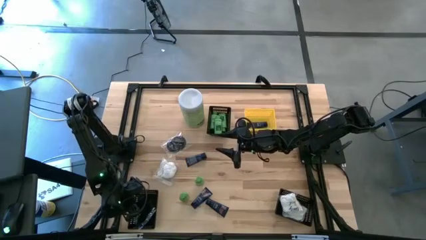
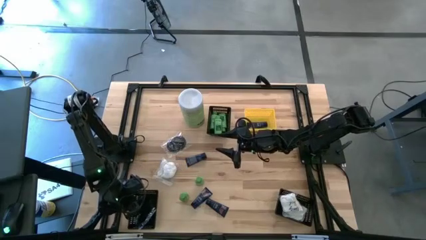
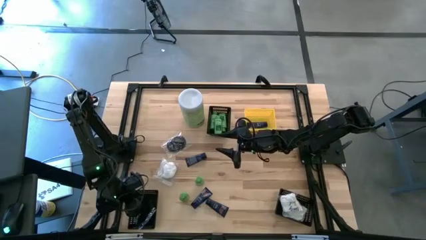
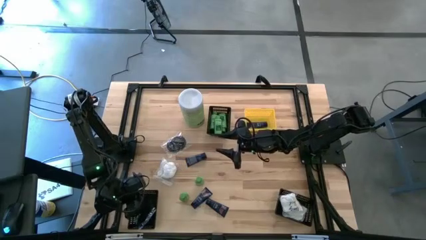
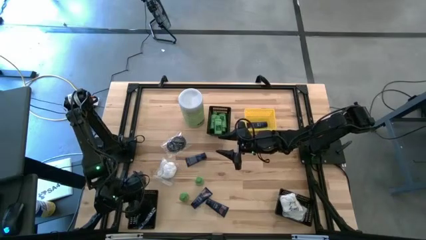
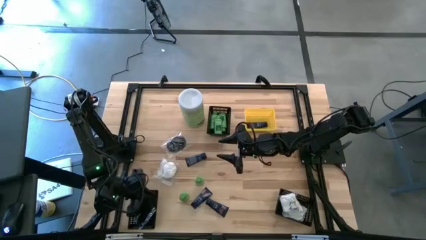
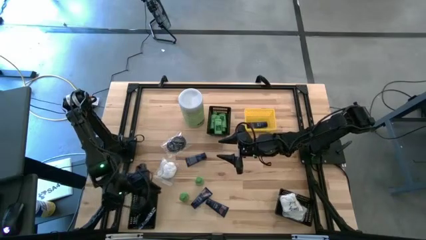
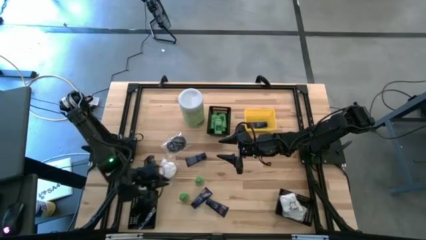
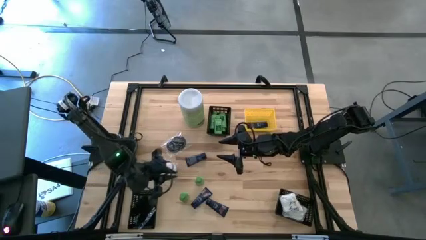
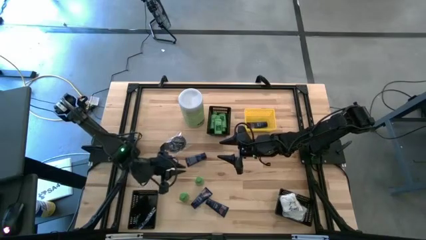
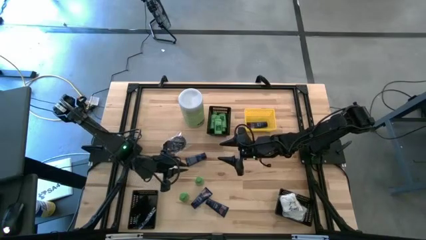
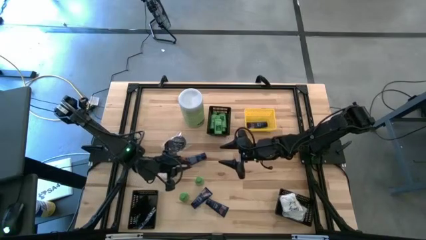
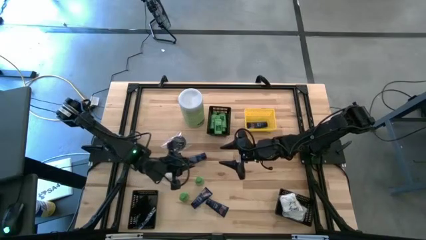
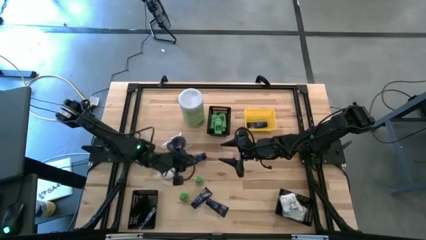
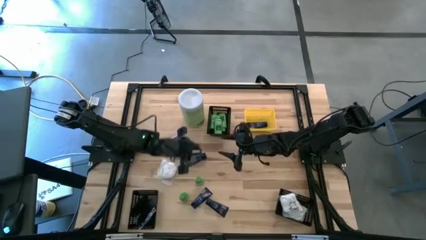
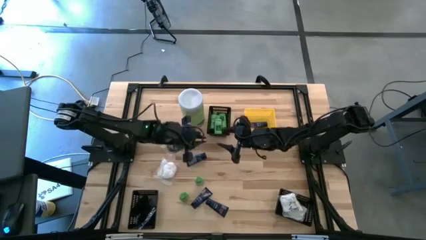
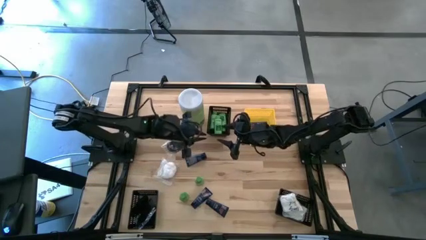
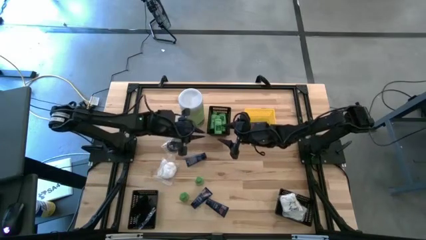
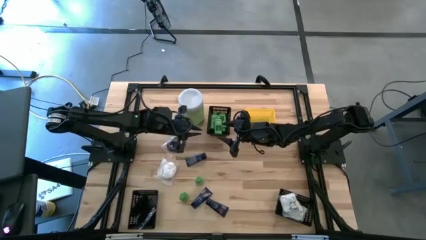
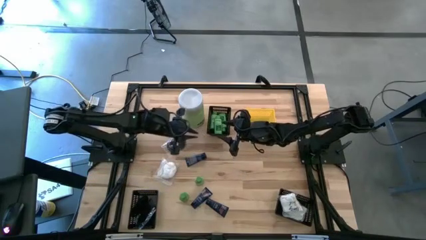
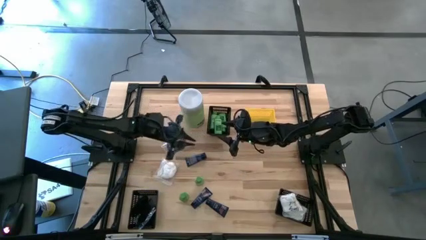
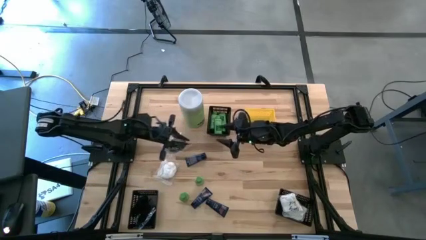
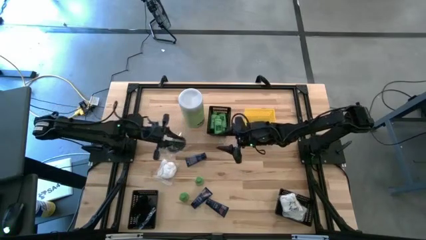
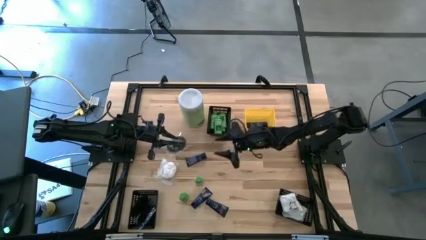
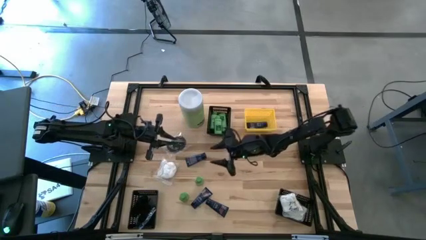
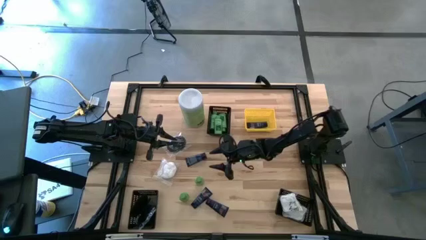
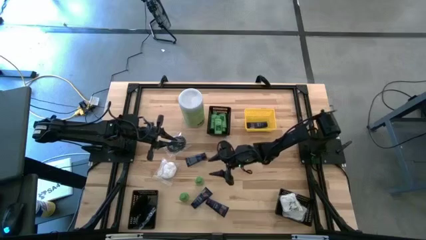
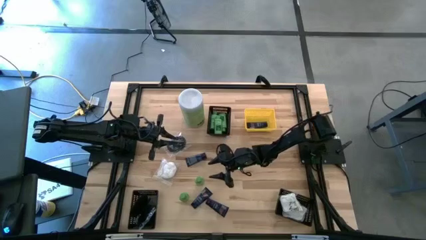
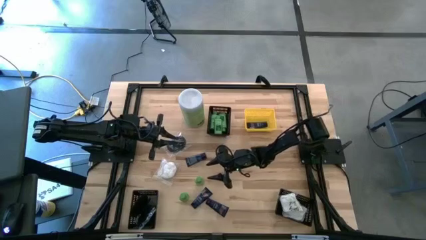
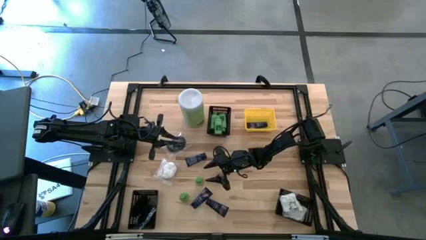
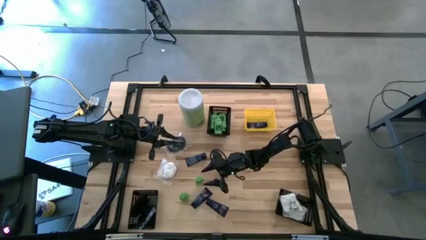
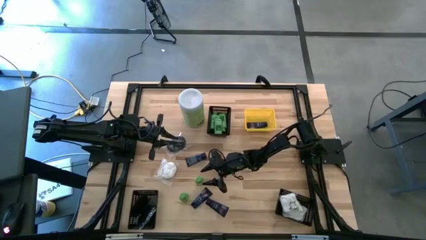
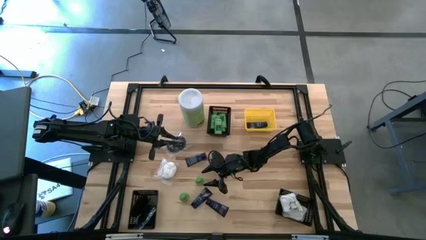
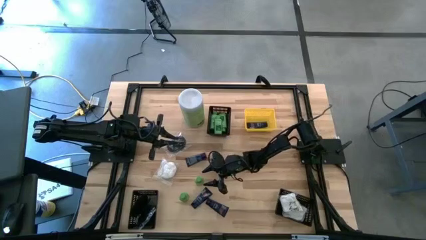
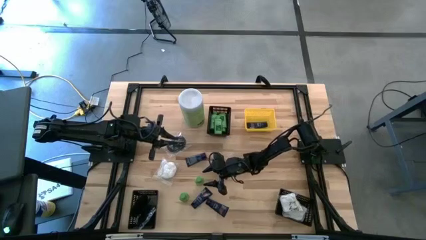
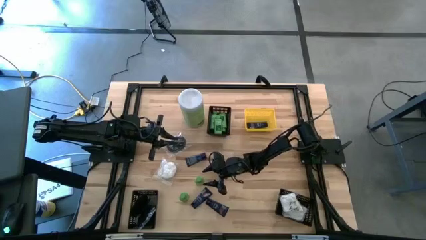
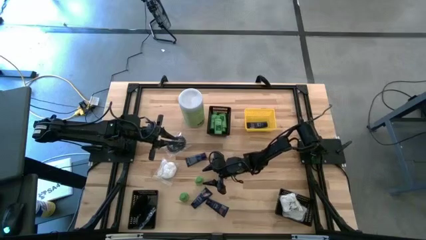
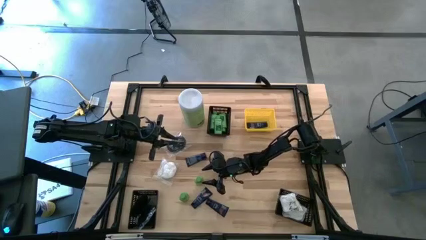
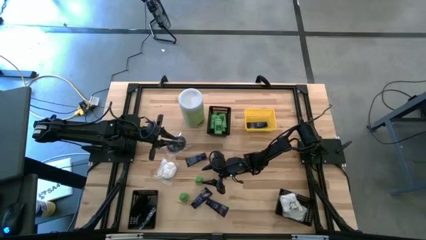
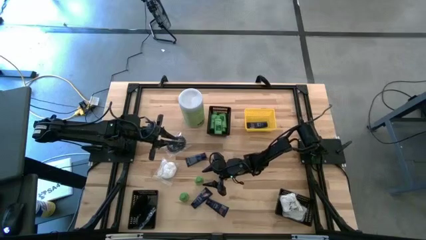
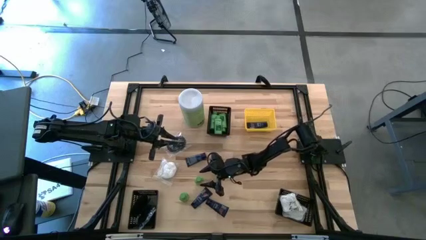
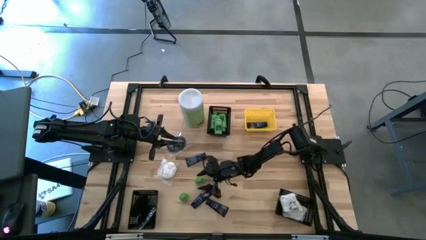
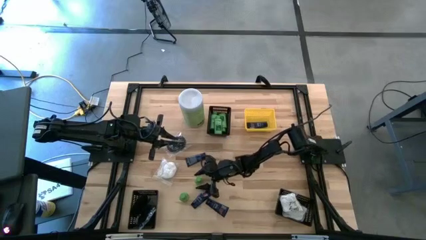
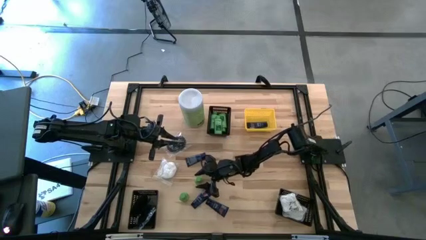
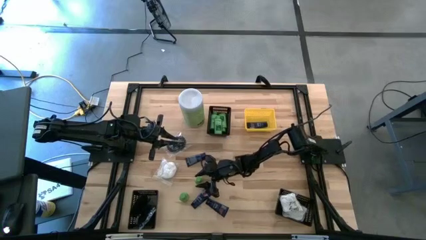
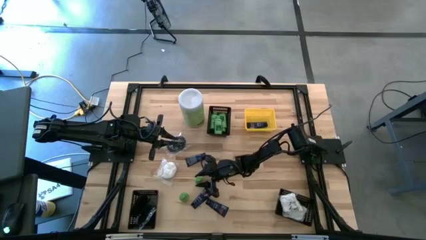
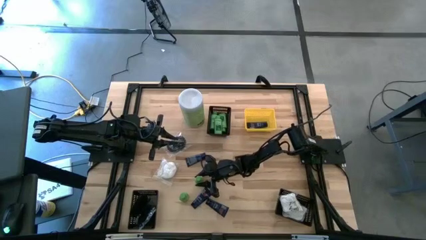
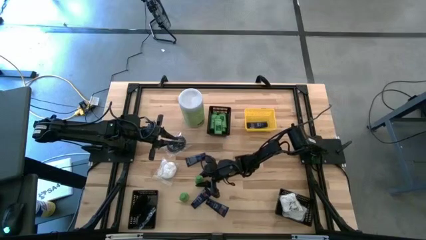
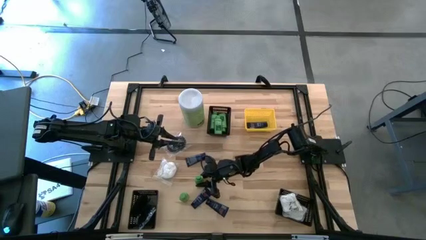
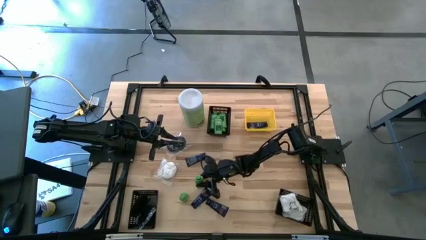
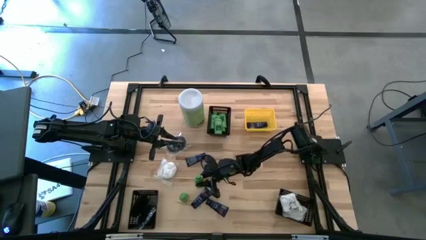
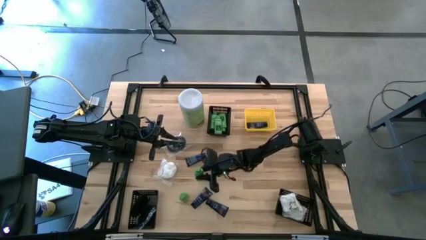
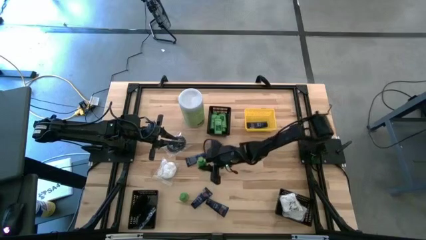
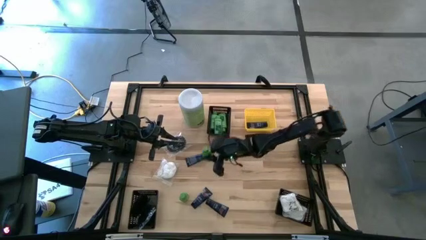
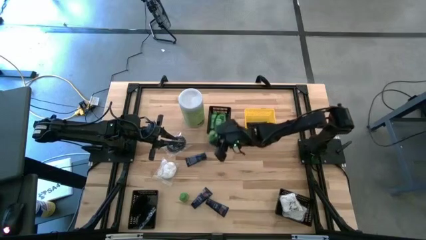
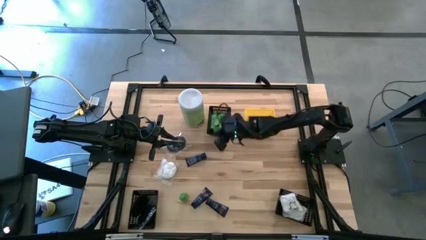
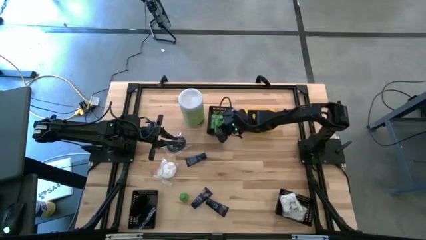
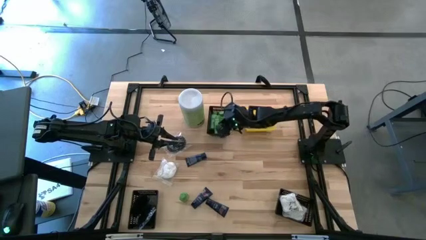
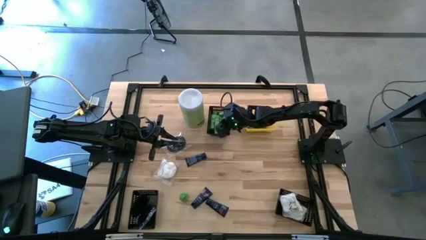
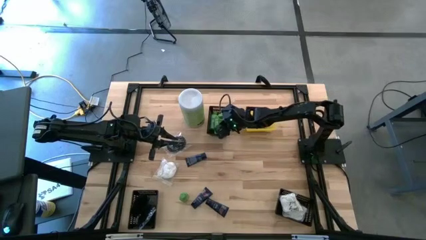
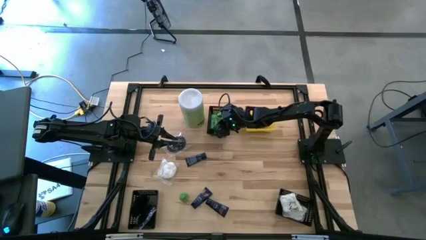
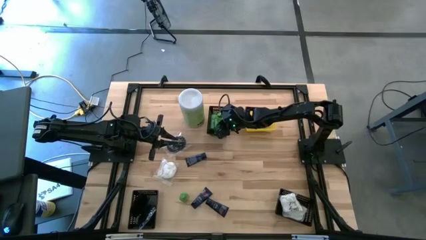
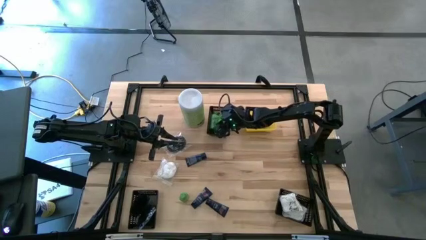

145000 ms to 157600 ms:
Task: Pick & Place Travel size toiletries
Put the green shampoo bottle into the top black bin
